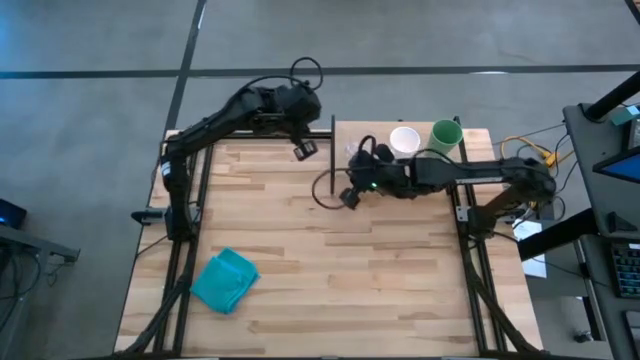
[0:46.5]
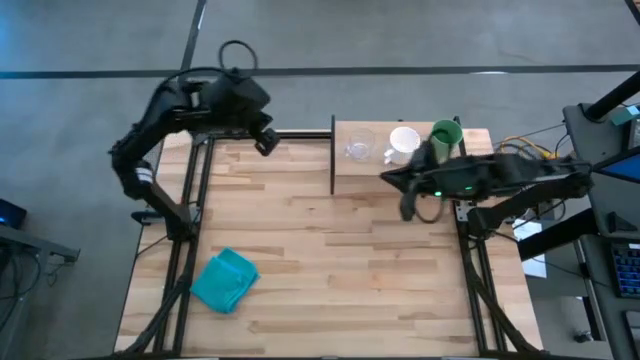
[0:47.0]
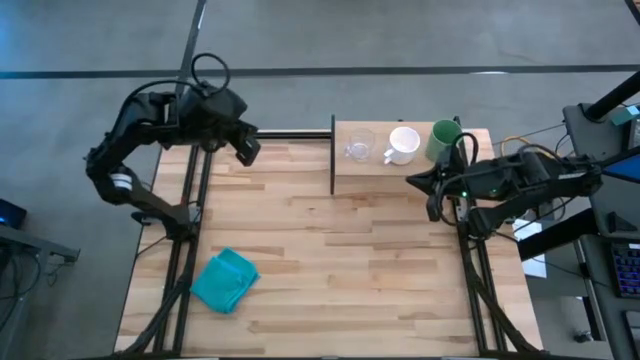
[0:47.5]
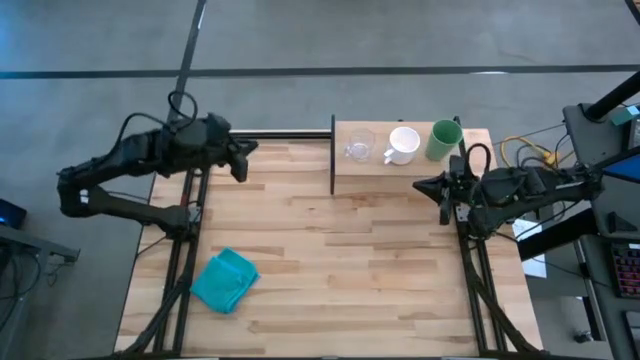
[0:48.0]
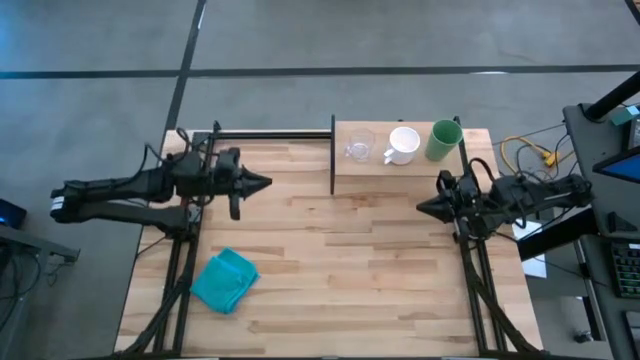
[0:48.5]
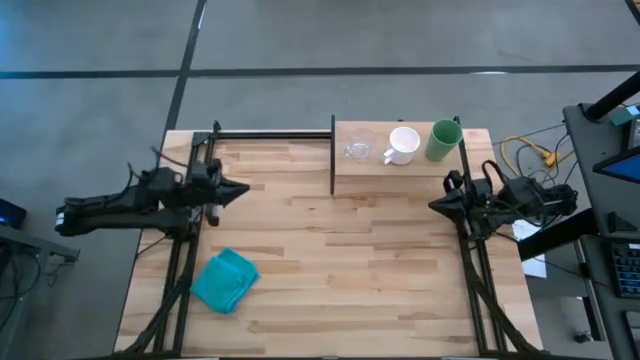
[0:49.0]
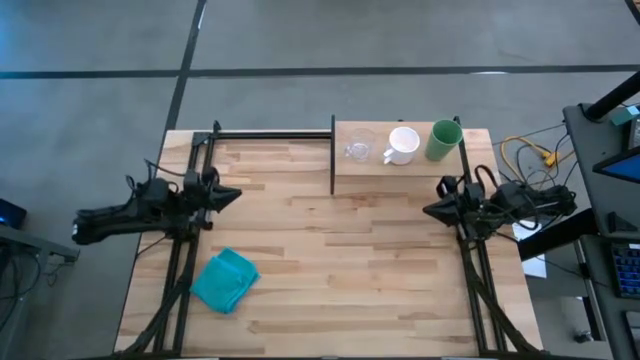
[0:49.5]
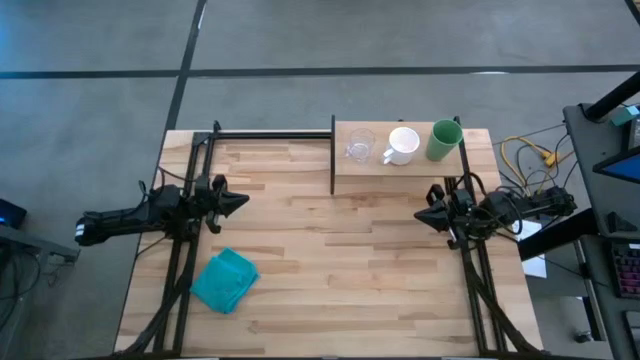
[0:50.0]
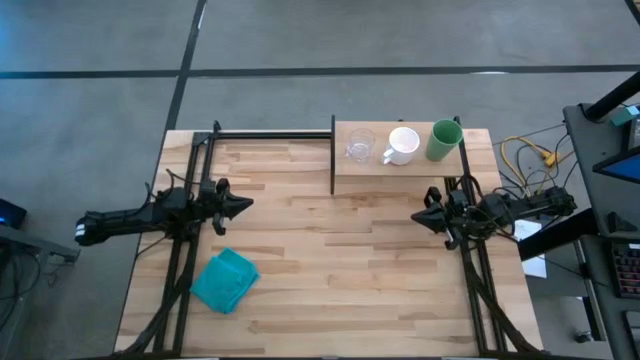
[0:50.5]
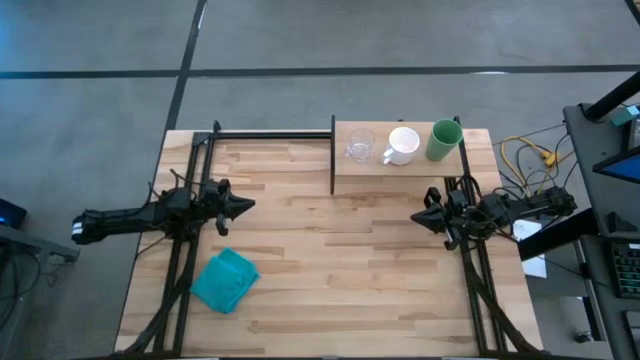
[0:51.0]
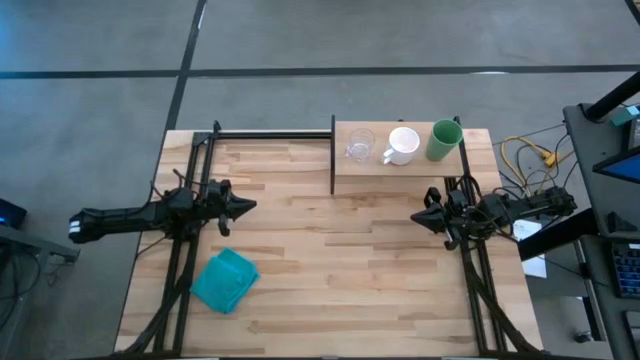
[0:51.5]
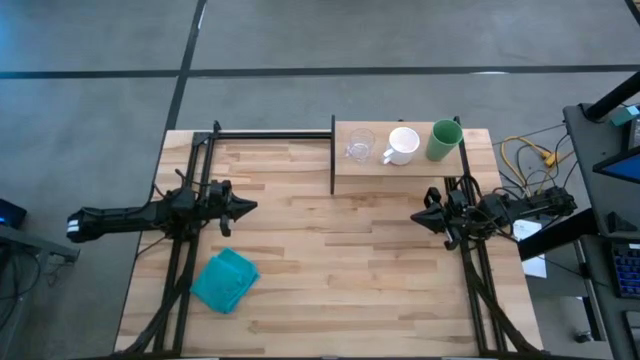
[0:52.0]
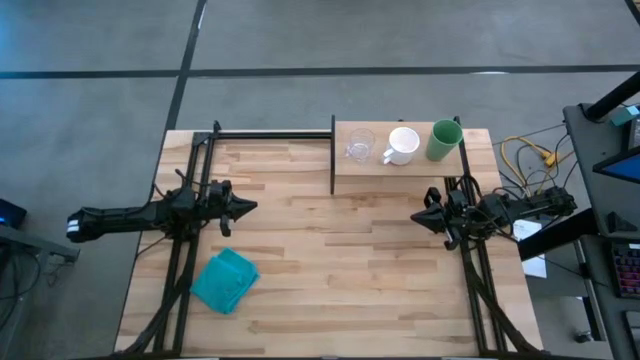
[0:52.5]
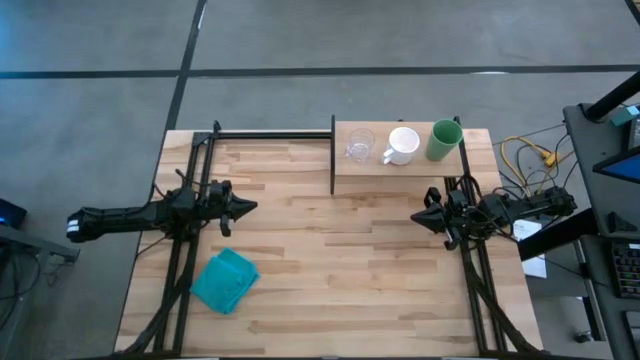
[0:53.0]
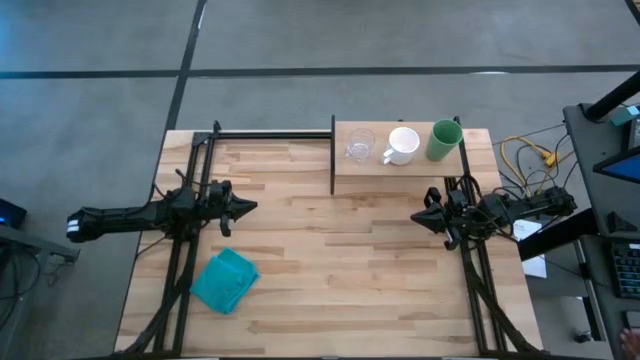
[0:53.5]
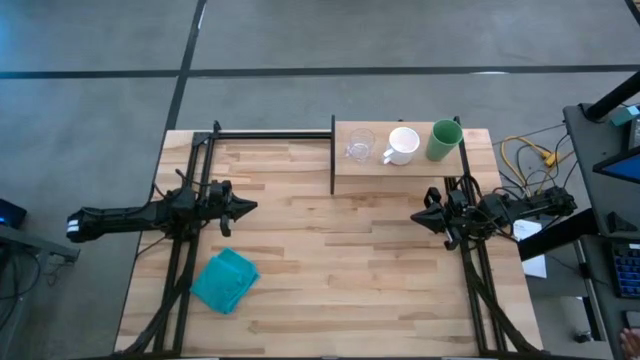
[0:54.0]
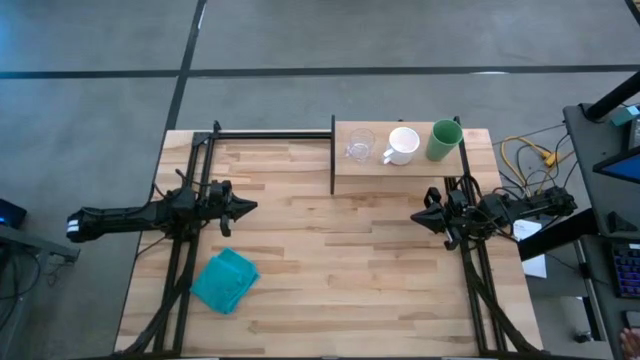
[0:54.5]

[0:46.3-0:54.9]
Task: Stack small to large cups/mugs on shelf
Return to Home Position

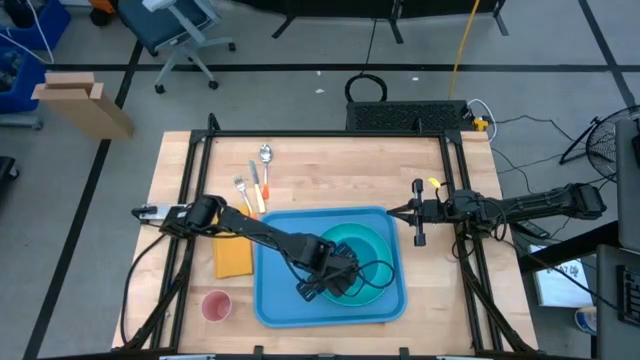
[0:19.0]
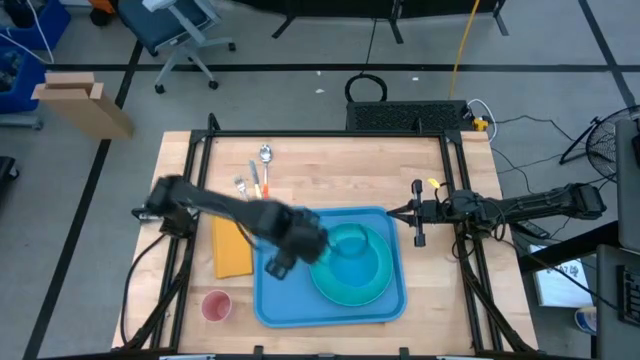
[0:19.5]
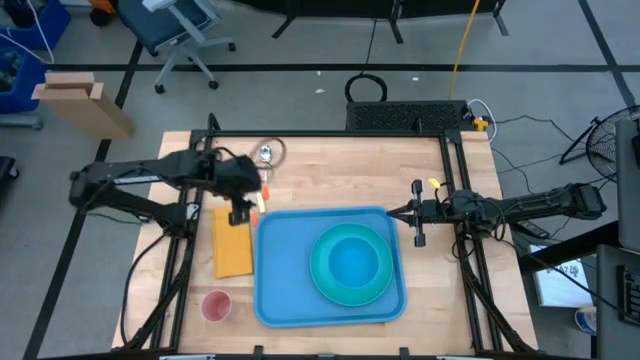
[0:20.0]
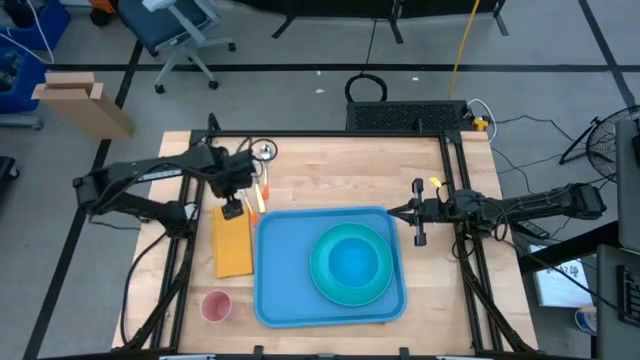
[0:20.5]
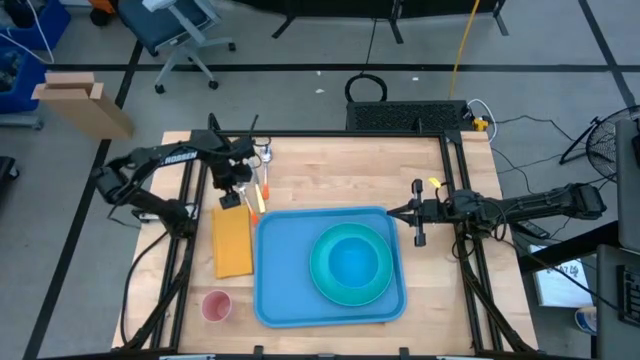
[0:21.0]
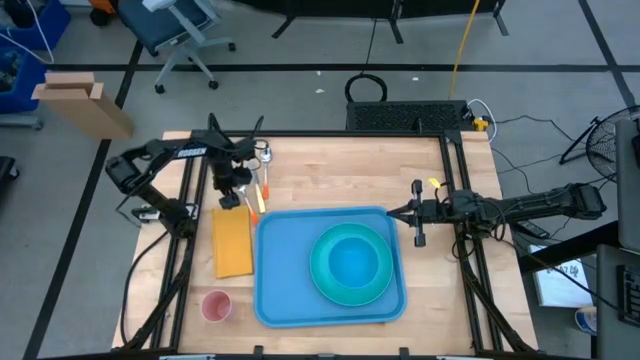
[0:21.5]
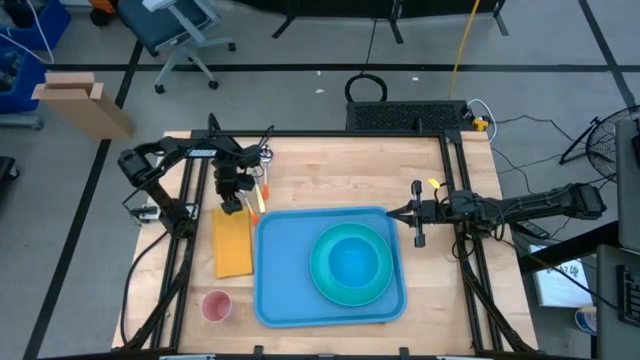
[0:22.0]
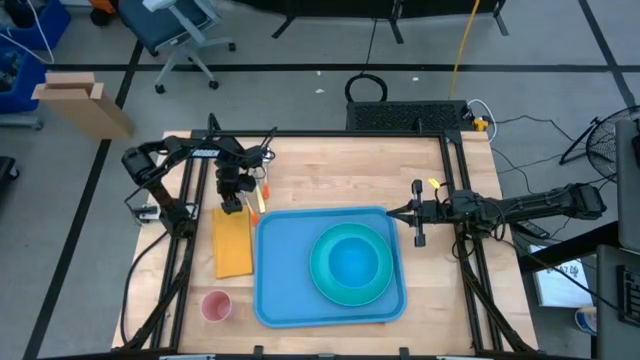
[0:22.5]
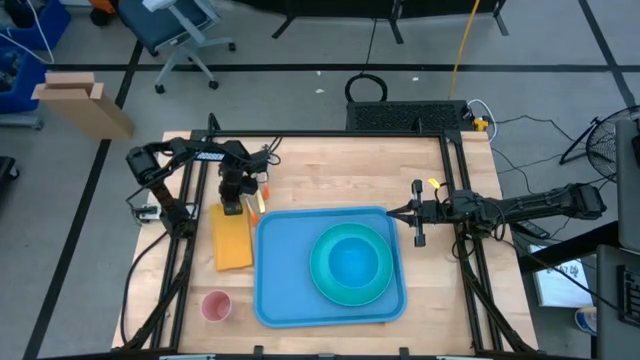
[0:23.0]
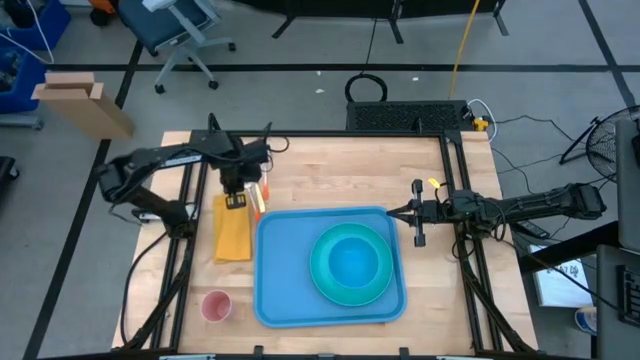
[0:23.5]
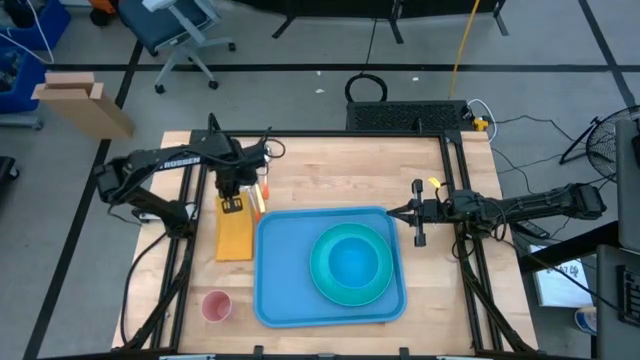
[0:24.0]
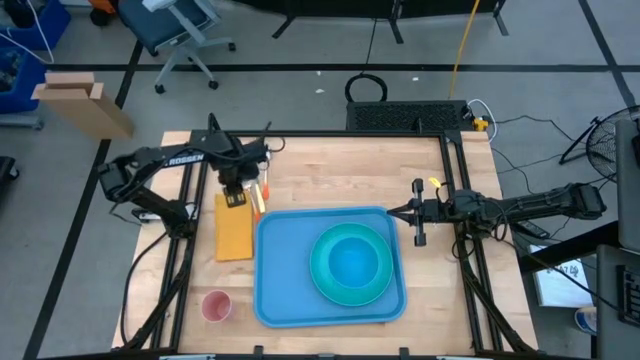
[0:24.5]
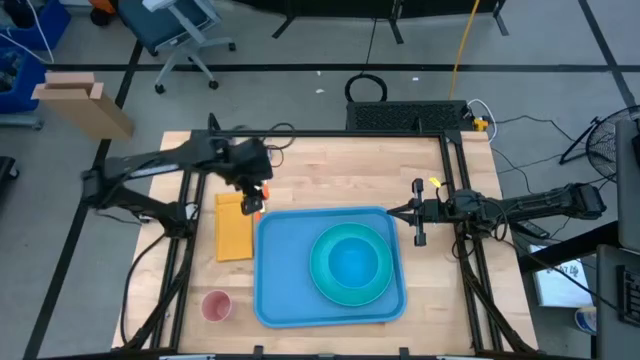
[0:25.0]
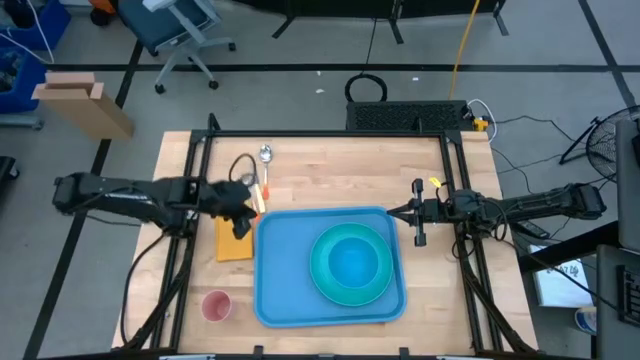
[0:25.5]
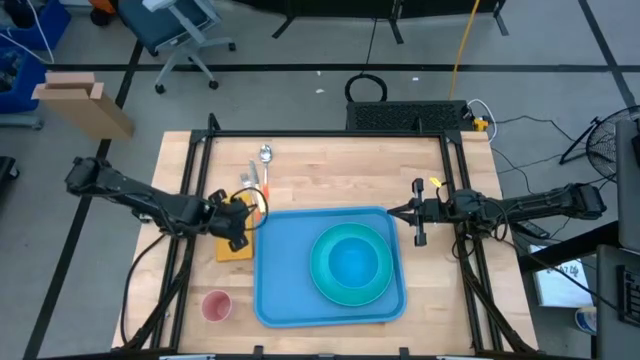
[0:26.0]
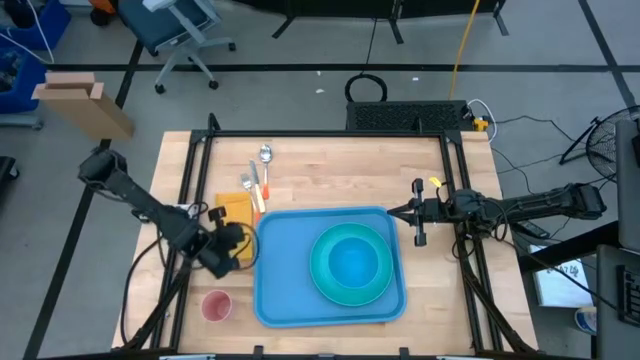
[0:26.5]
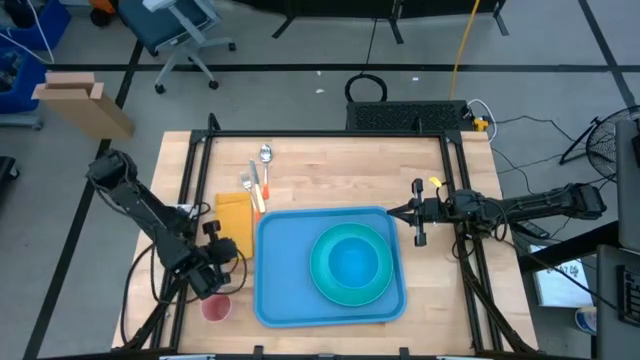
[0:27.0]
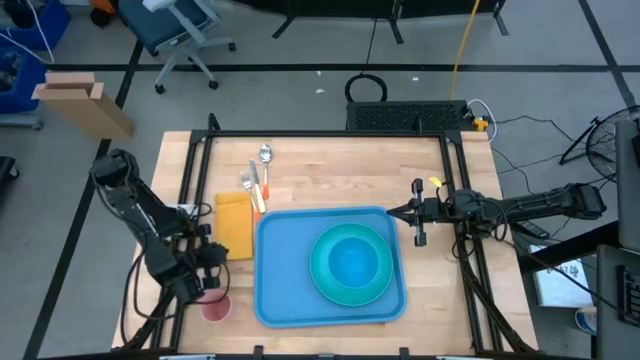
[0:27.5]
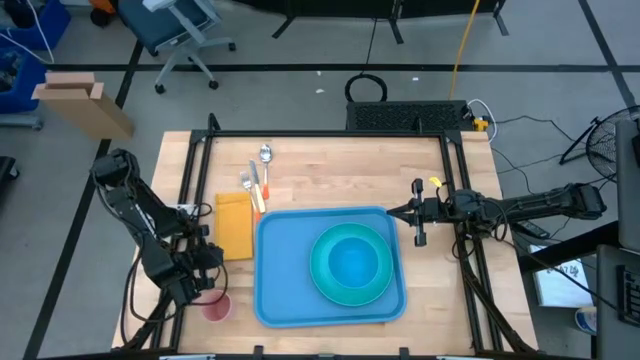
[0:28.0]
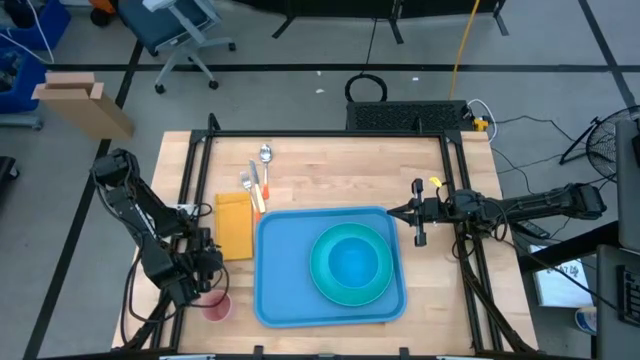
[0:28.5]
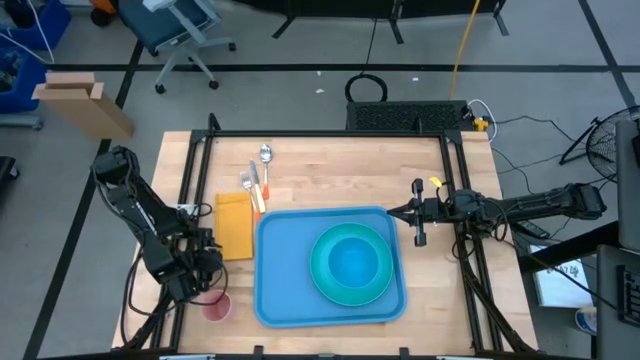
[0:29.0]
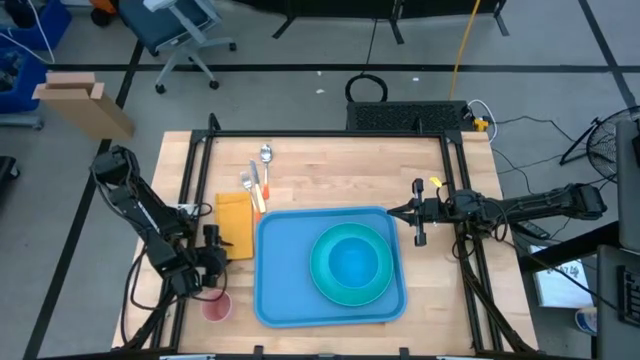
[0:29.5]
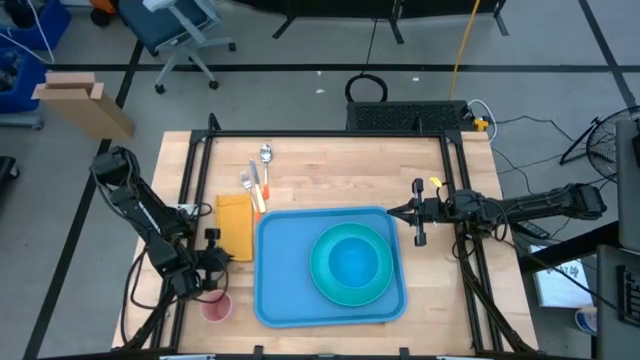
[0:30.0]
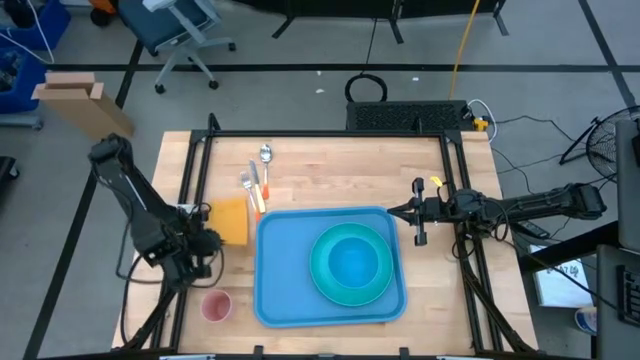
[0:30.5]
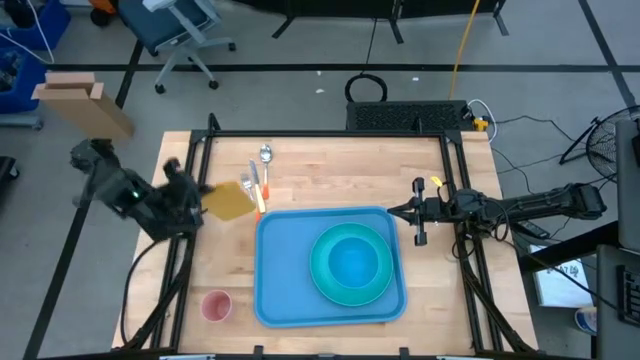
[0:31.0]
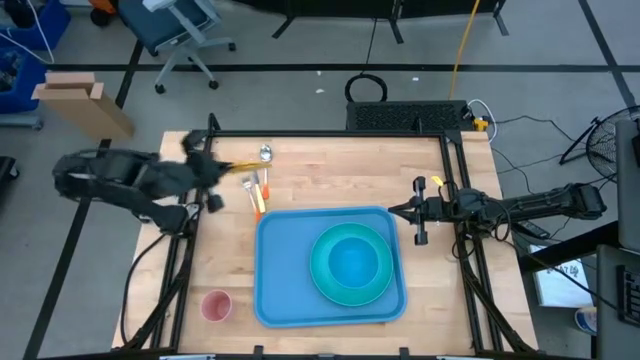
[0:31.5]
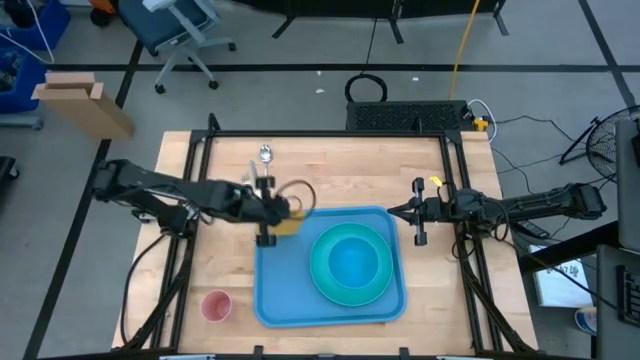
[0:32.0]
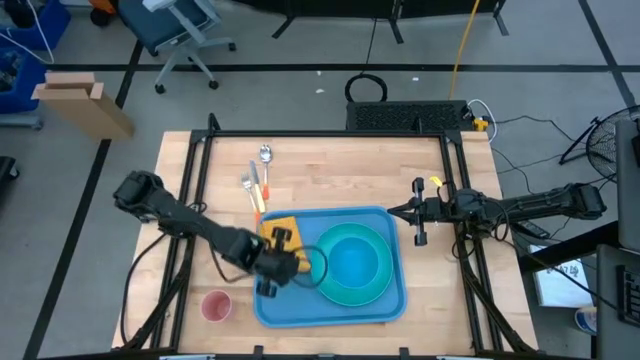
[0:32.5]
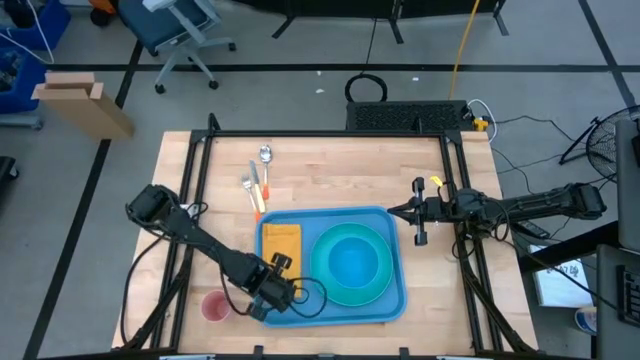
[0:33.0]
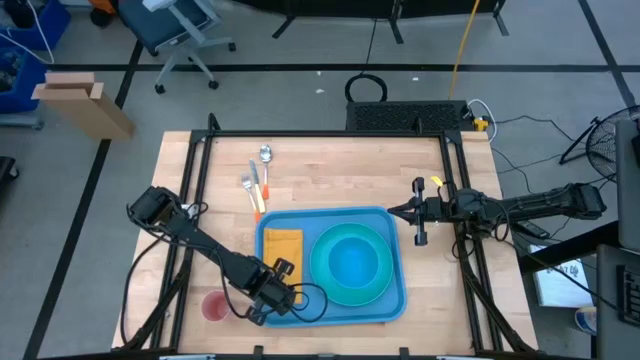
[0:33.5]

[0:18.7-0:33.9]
Task: Set up tray
Put the yellow napkin on the blue serving tray to the left of the light green plate
